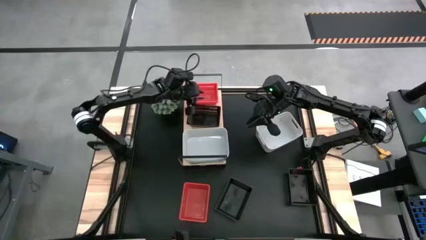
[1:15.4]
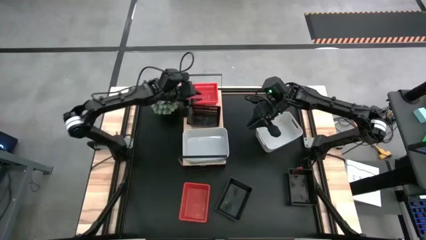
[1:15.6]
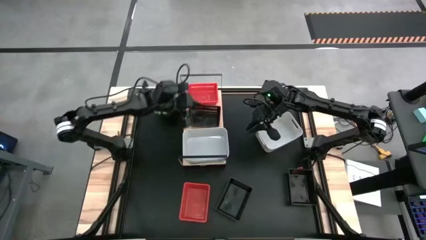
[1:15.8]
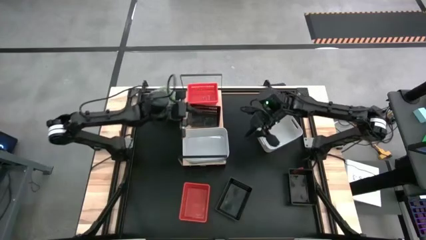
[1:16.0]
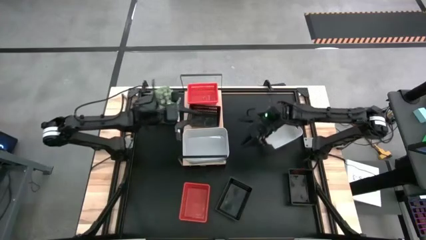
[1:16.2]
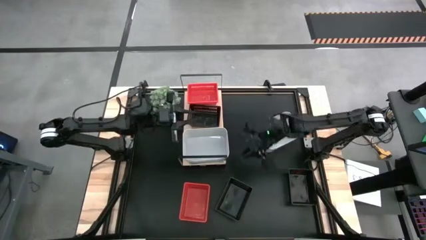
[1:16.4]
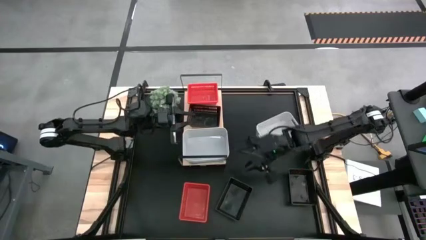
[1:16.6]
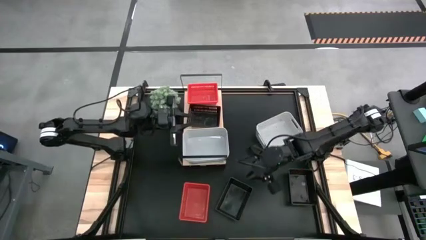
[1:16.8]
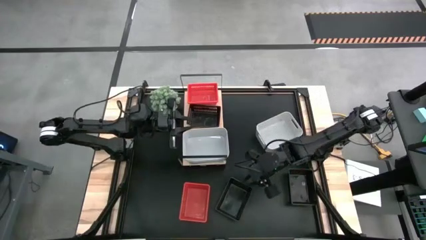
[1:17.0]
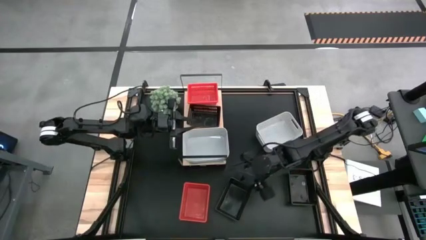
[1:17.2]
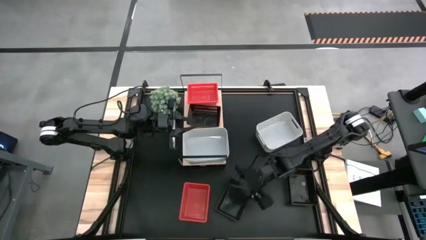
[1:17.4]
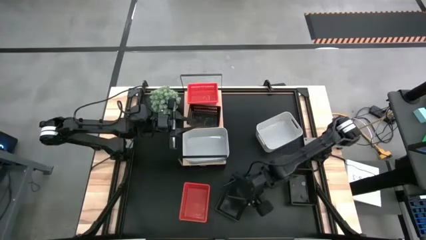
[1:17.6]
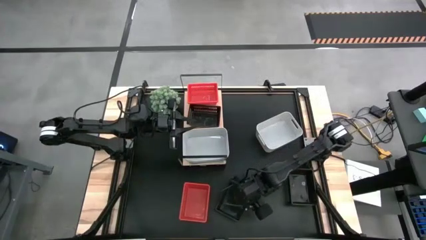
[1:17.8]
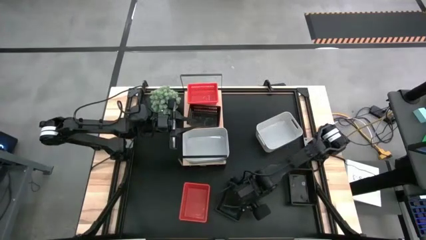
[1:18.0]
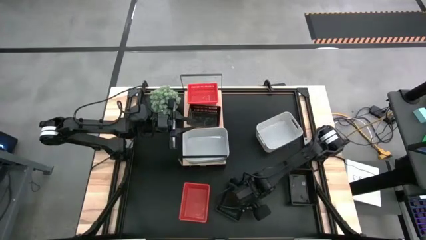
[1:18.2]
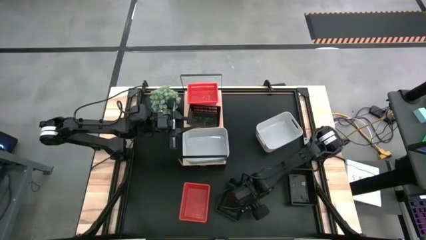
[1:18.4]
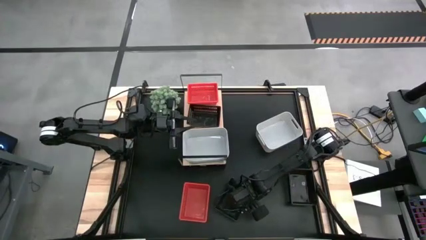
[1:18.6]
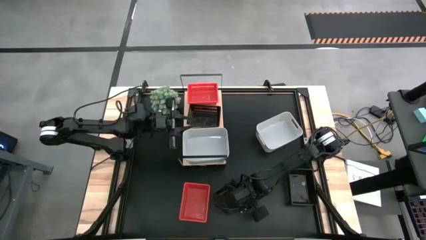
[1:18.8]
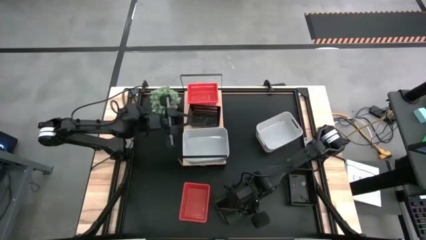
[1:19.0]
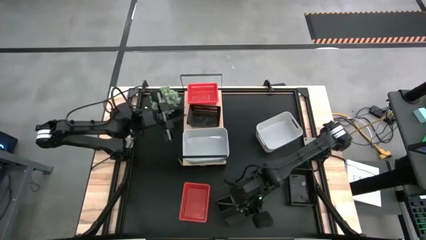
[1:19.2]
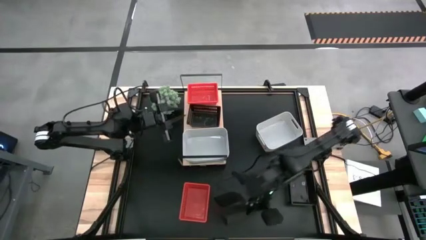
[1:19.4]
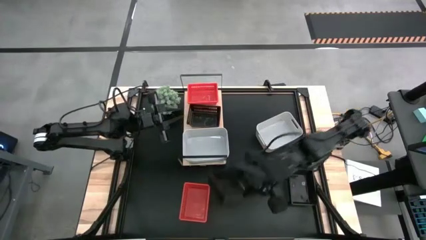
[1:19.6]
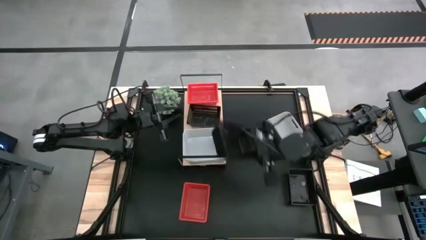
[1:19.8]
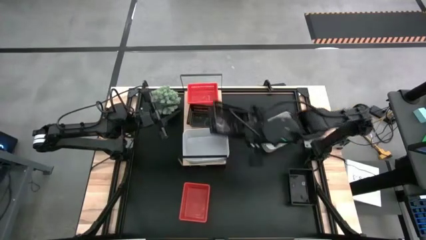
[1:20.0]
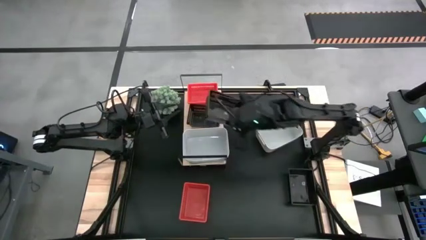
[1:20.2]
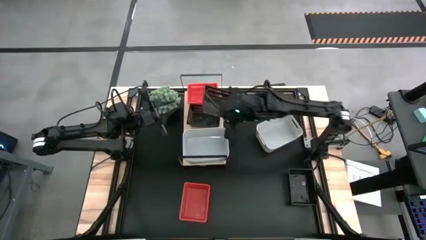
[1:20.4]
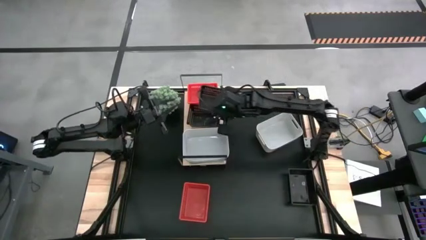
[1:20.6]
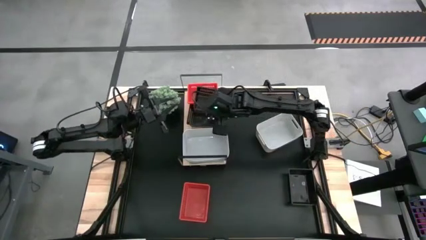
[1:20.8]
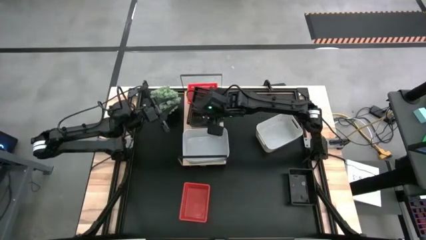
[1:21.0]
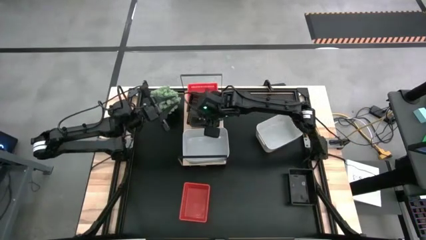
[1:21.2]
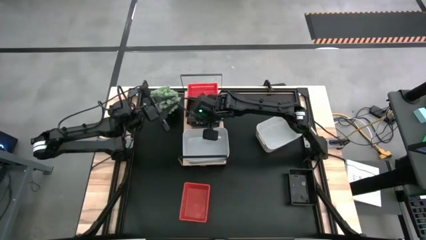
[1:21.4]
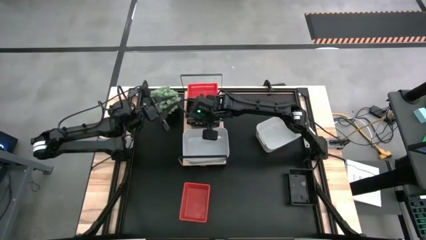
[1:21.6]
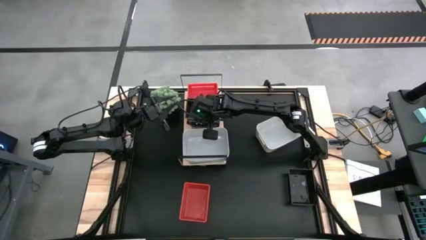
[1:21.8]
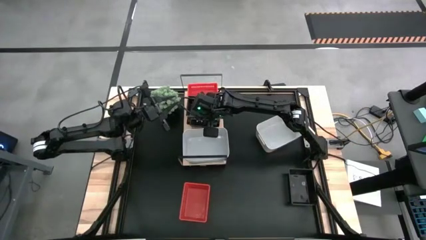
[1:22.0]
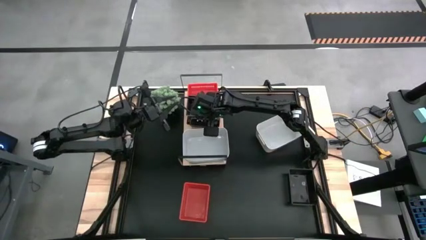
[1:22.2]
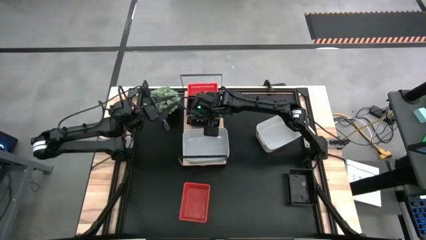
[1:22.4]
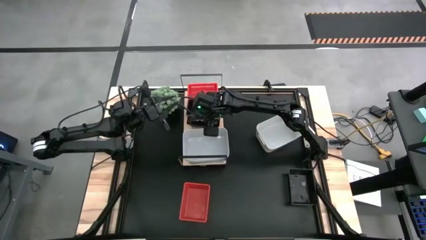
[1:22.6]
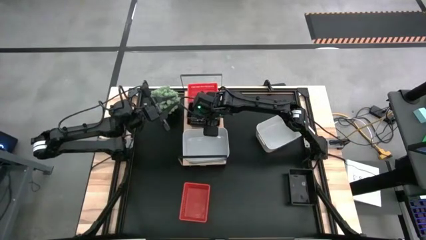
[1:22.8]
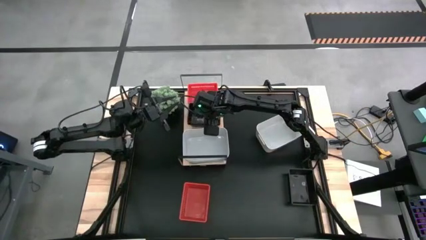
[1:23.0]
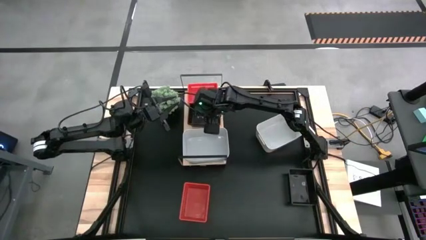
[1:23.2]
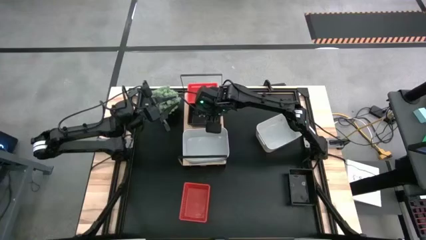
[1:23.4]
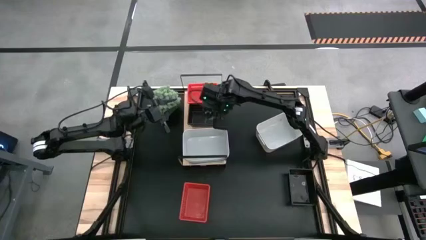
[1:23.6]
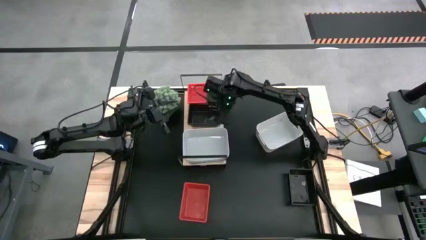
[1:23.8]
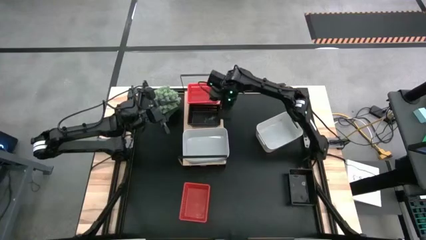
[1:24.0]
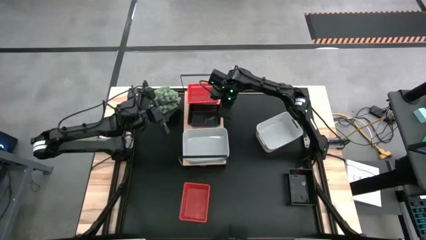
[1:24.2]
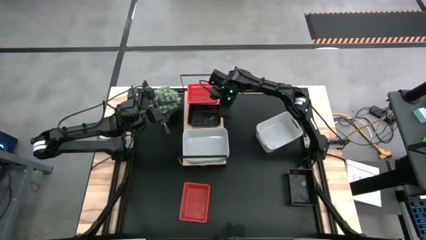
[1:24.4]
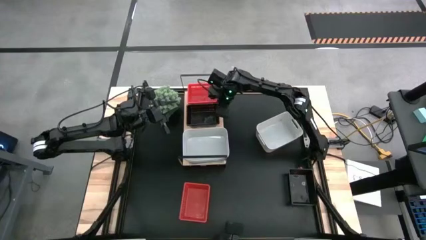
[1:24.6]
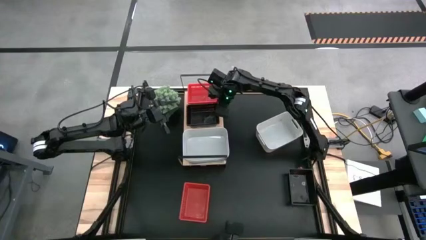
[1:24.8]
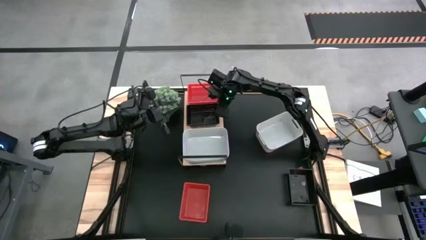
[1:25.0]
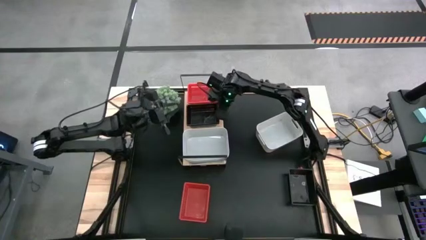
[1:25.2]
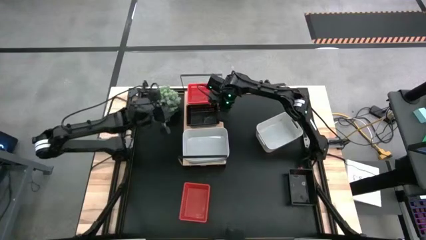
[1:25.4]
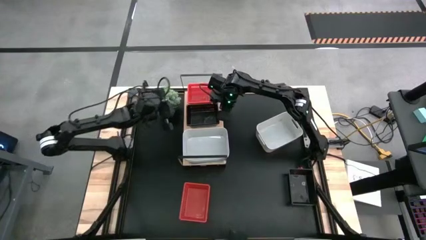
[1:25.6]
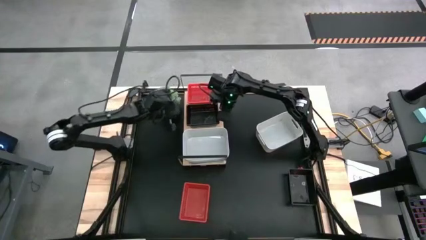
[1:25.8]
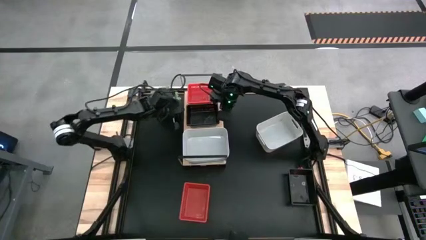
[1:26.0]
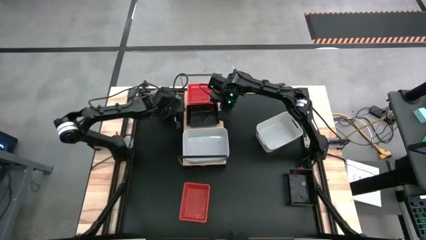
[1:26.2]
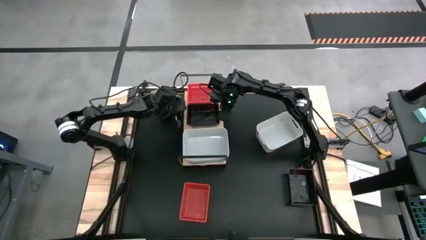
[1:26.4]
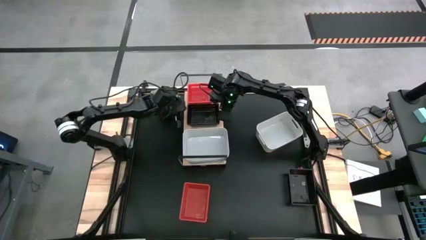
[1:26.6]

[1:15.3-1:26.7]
Task: Stack baskets on shelf by color
Stack the left black bin on top of the black bin on the shelf

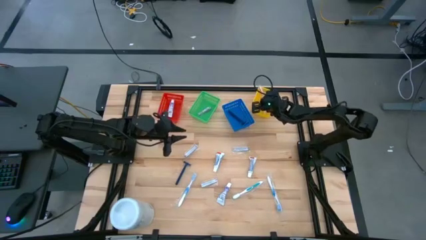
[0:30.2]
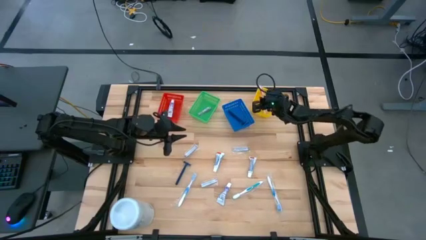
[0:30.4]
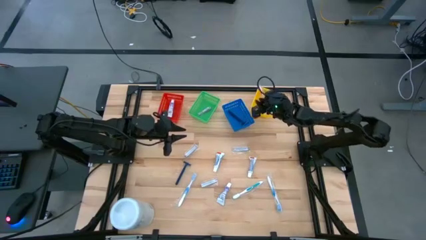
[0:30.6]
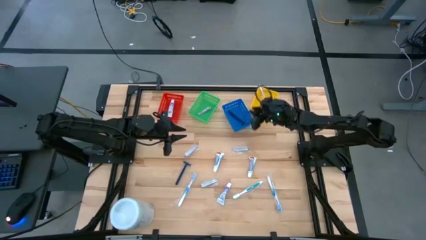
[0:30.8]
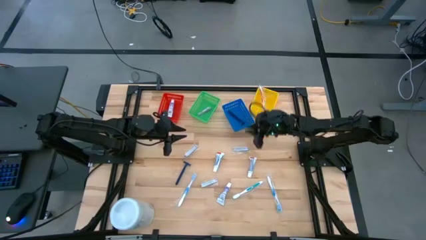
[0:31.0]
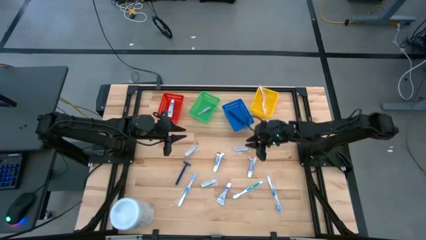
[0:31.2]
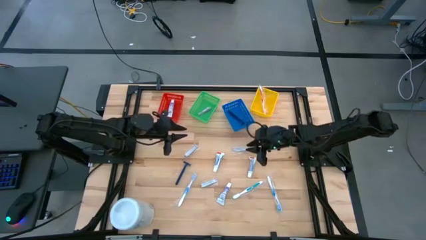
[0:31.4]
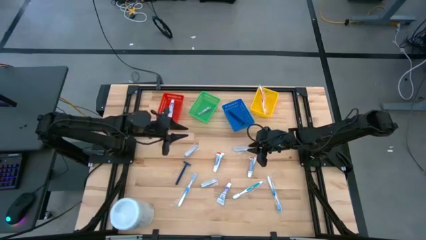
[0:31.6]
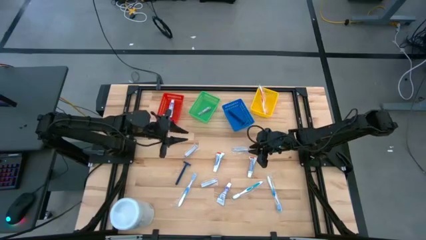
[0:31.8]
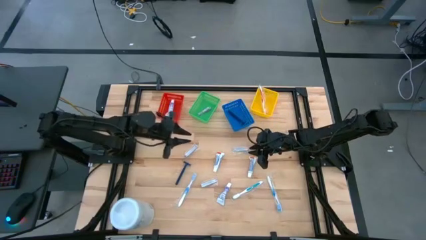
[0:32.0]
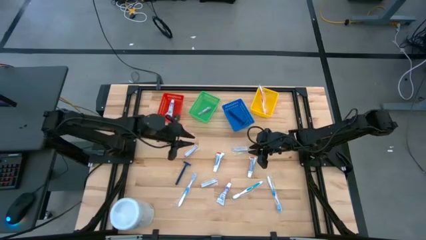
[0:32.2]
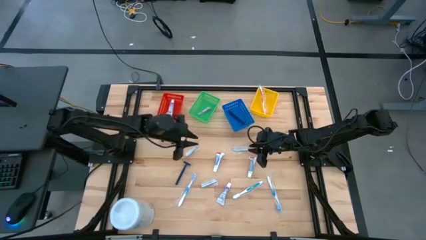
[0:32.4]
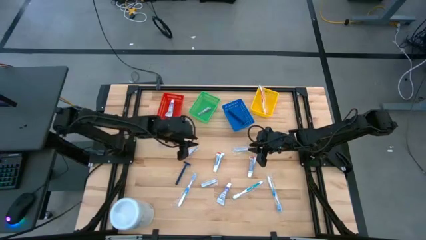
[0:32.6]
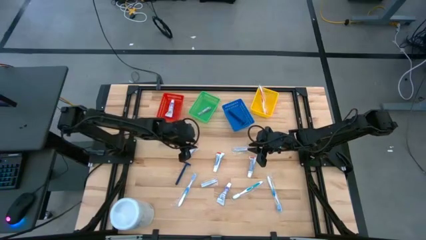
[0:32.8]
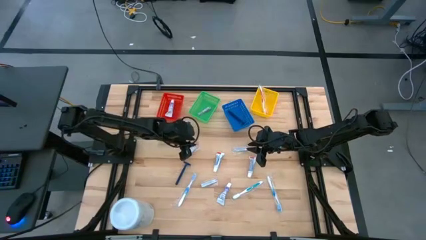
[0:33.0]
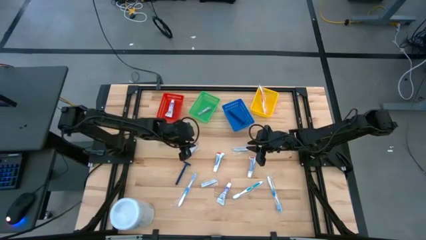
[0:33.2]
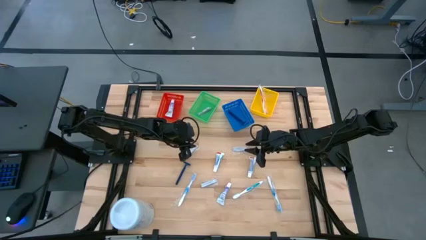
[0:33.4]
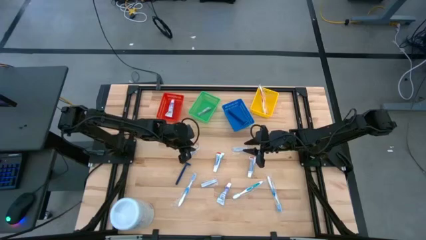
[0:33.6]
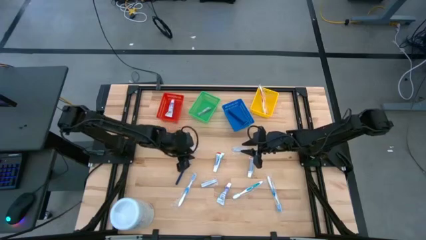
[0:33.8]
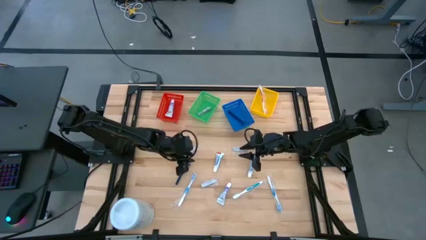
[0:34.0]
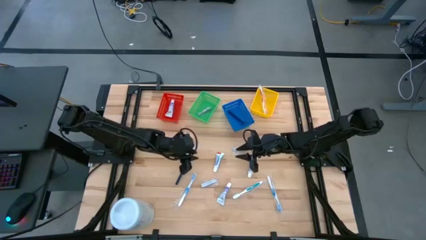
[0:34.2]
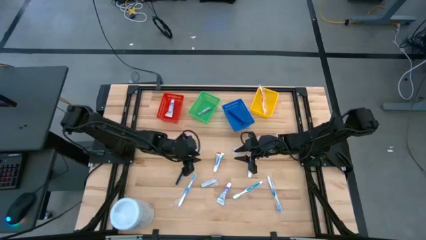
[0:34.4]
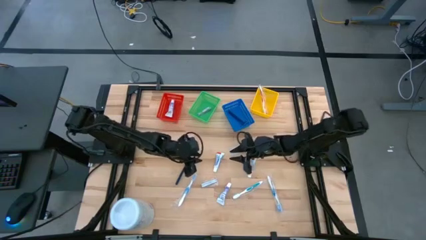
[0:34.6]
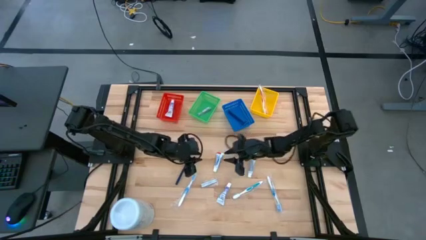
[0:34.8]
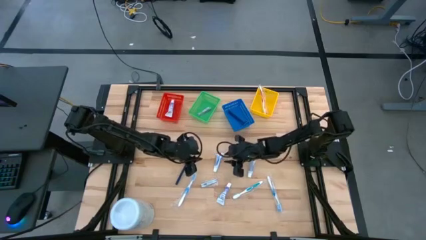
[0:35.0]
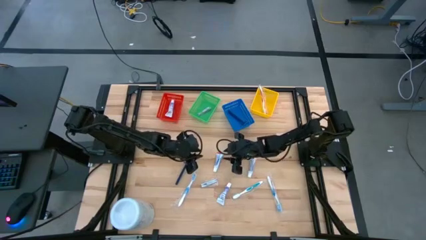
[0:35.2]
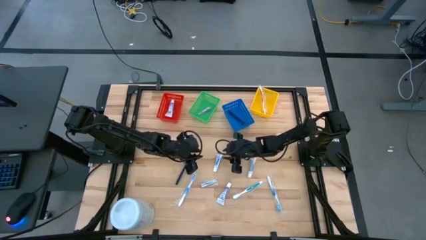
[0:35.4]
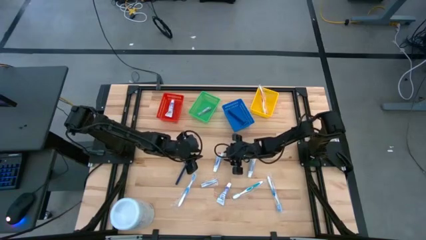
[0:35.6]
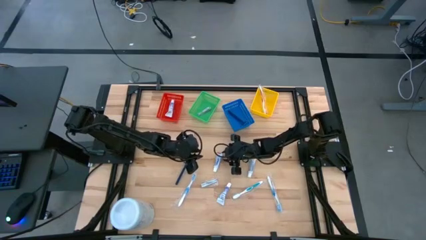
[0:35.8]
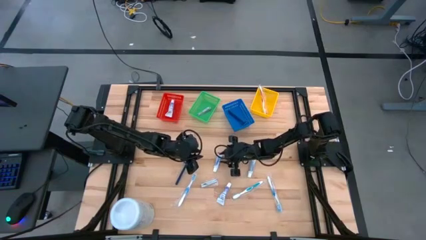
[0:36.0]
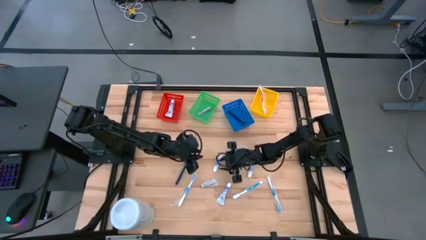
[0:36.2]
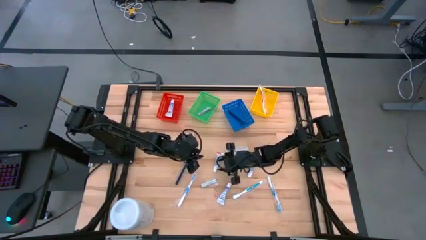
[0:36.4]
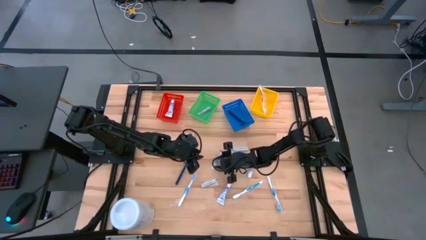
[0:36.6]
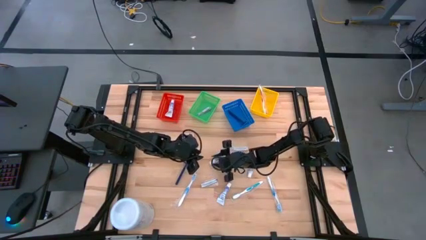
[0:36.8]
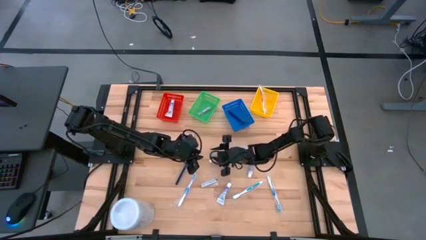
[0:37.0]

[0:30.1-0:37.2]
Task: Pick & Place Travel size toiletries
Put the white toothpaste in the red bin
